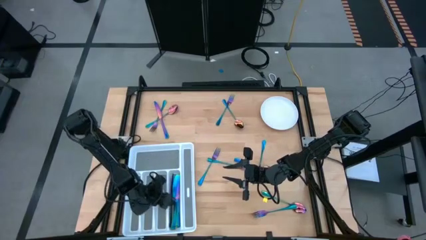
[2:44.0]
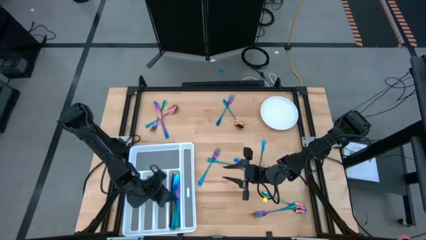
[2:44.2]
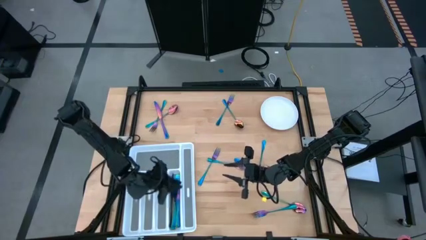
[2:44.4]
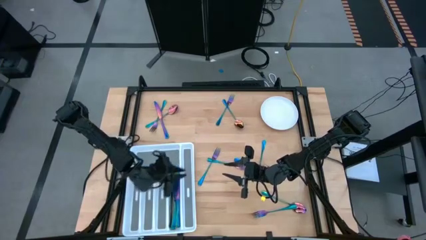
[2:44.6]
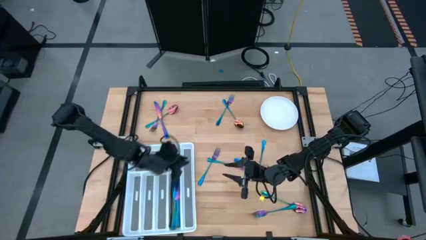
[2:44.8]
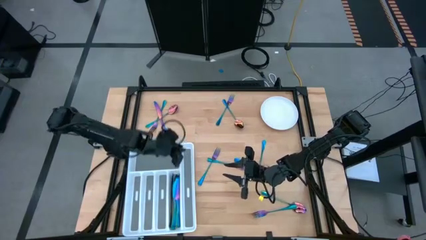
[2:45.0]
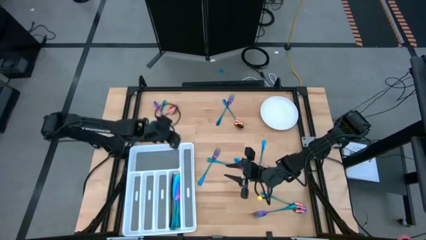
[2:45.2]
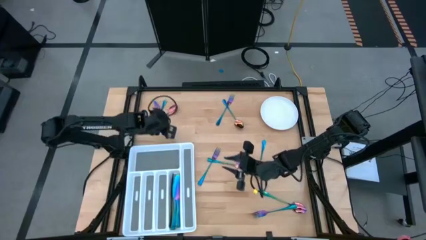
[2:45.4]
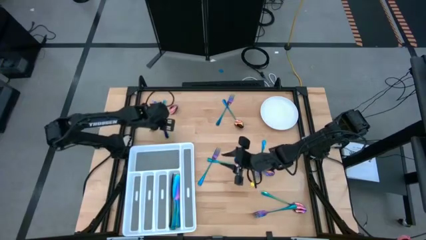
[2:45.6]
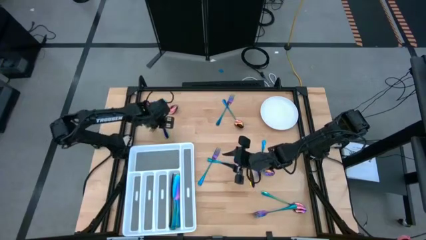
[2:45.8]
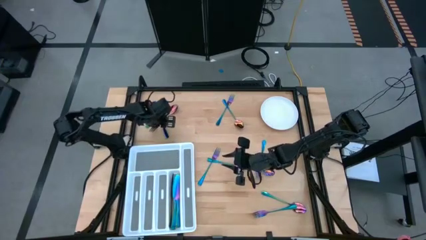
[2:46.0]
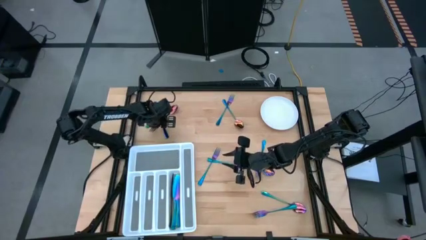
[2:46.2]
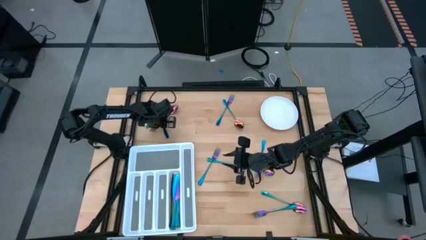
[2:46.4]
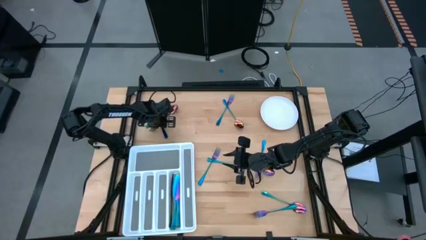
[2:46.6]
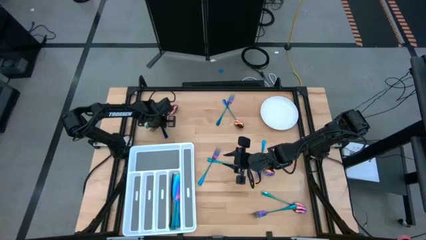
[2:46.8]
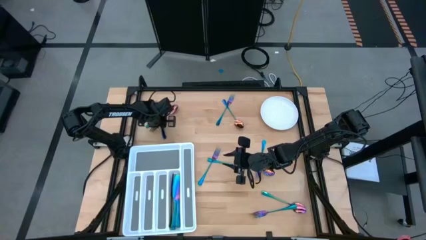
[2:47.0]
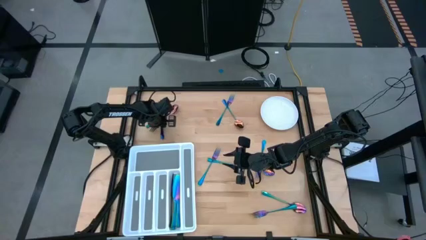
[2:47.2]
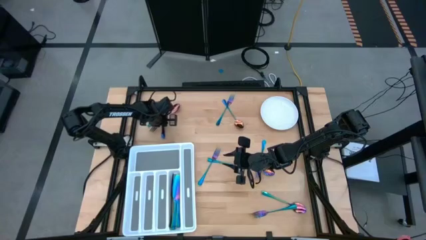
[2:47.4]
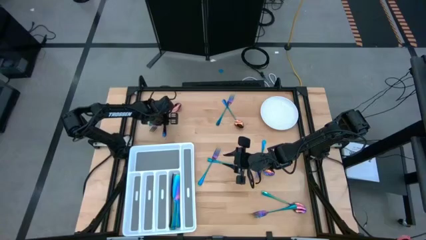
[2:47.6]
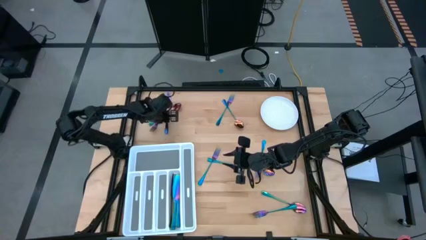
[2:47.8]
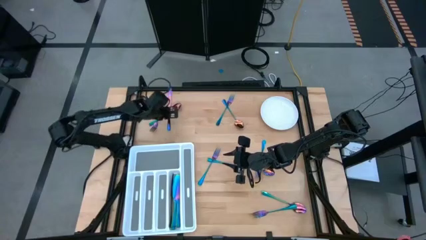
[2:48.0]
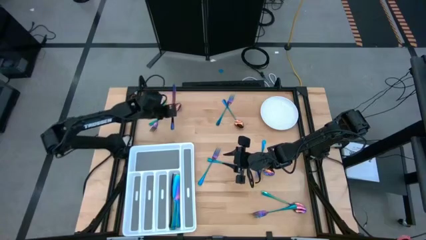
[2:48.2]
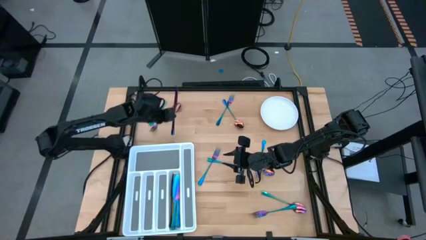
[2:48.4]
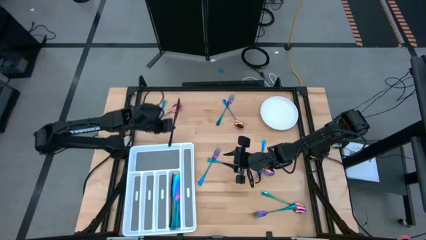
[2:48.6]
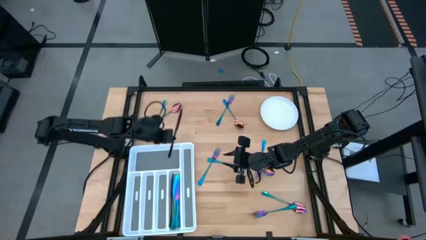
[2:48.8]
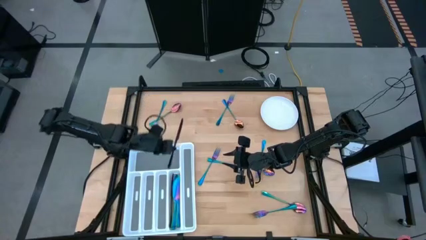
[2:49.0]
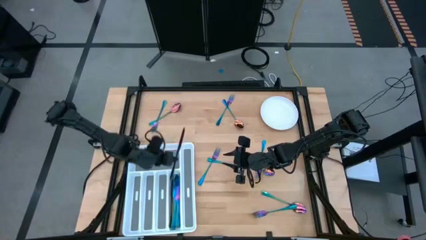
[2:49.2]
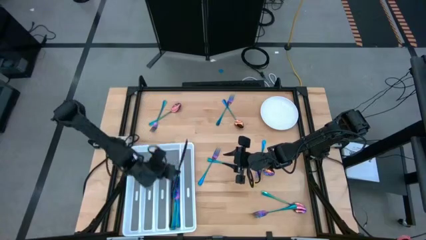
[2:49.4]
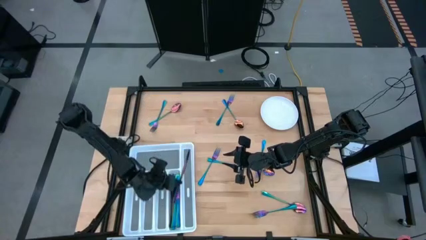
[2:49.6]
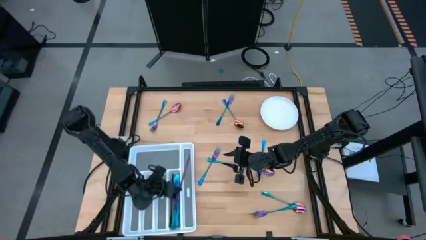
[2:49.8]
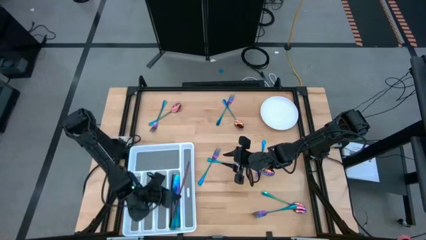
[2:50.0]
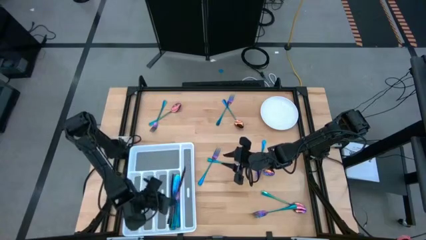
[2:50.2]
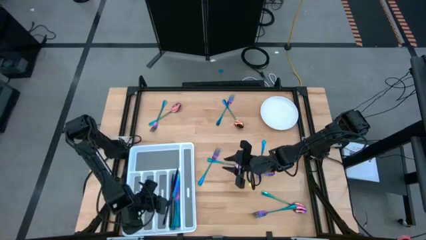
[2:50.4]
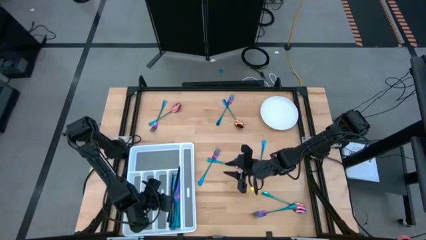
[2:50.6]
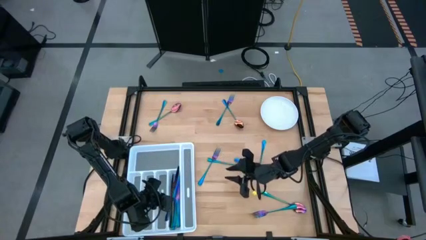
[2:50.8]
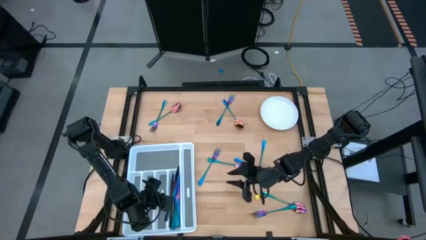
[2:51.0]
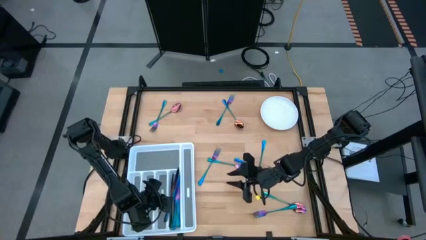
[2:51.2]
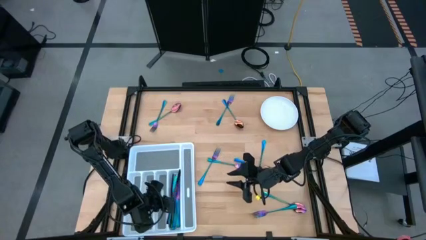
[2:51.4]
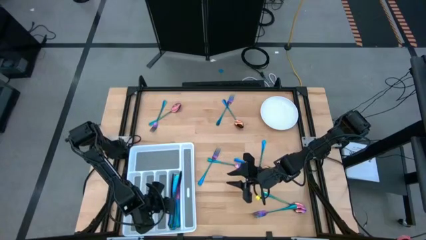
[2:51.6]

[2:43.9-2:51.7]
Task: Sort silverware
Put the iridescent knife into the cutlery tray

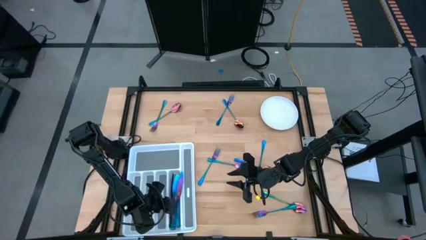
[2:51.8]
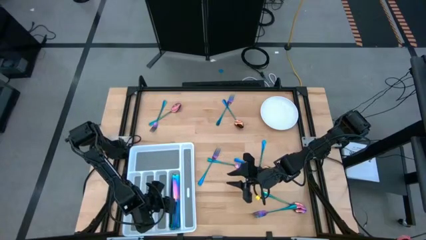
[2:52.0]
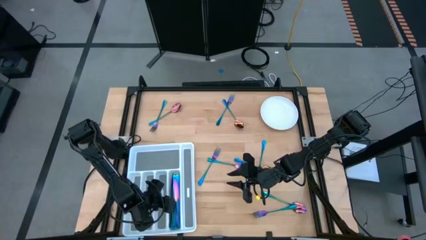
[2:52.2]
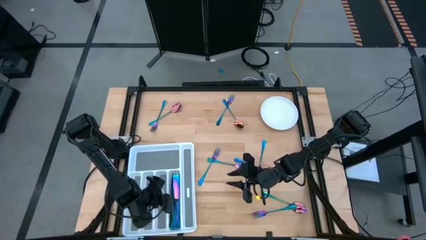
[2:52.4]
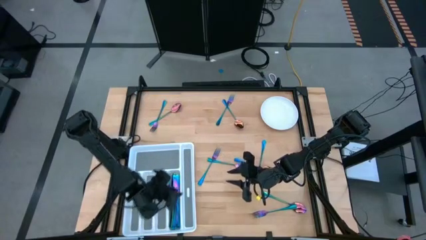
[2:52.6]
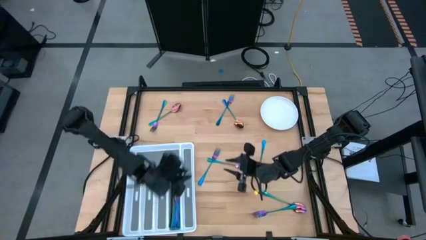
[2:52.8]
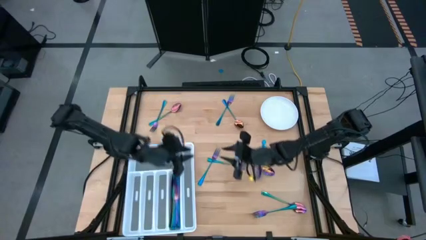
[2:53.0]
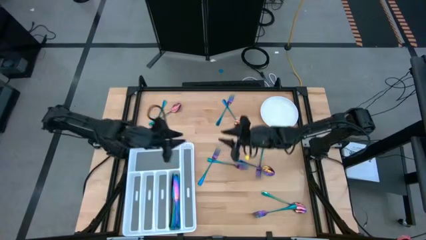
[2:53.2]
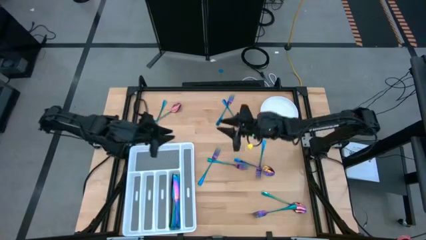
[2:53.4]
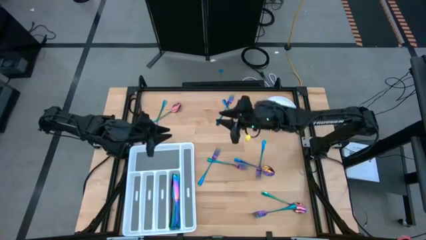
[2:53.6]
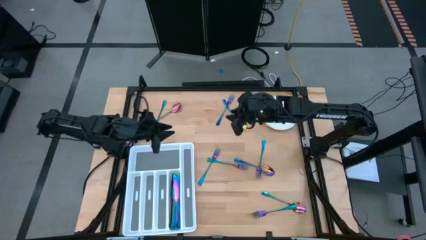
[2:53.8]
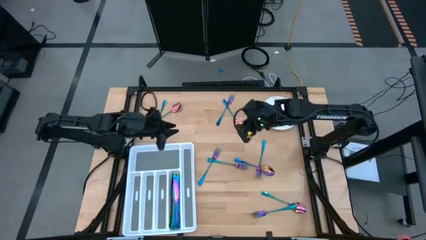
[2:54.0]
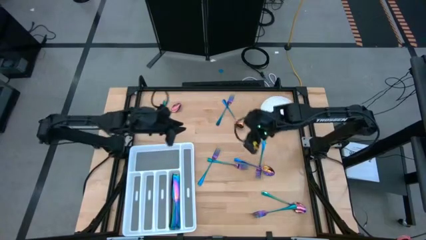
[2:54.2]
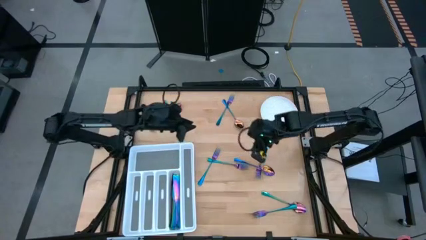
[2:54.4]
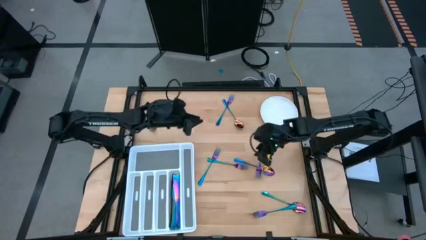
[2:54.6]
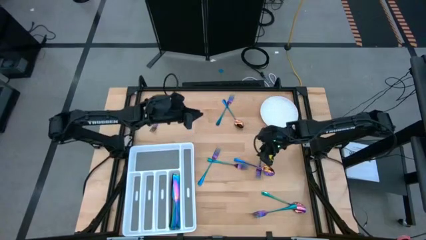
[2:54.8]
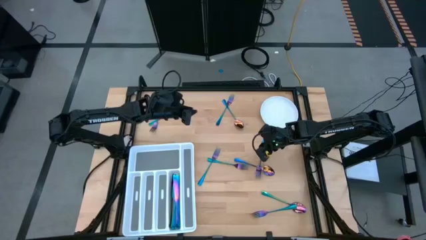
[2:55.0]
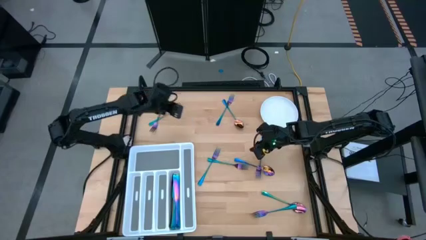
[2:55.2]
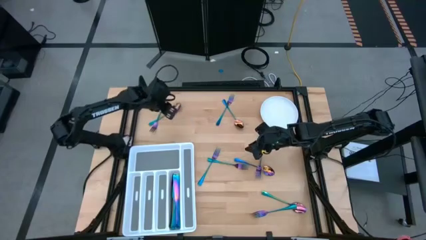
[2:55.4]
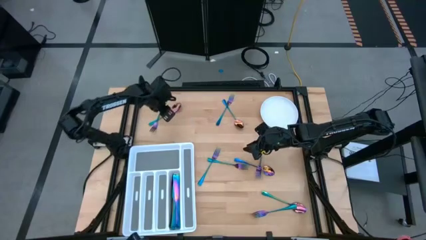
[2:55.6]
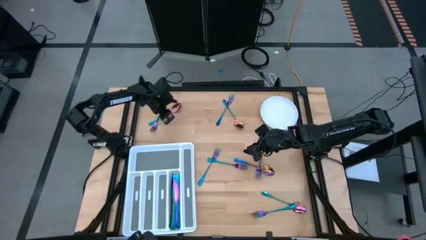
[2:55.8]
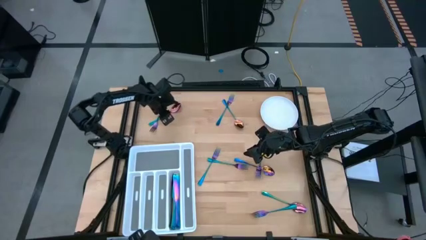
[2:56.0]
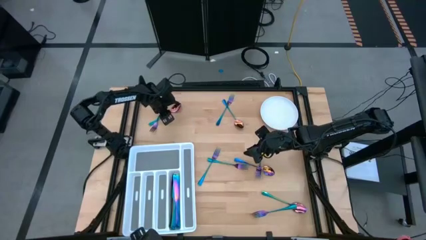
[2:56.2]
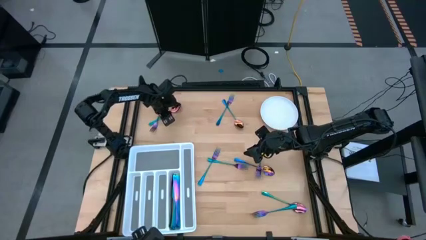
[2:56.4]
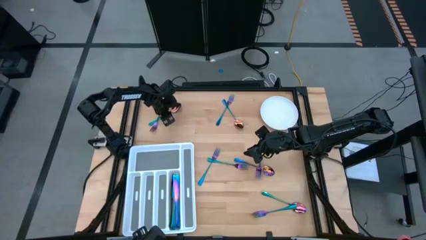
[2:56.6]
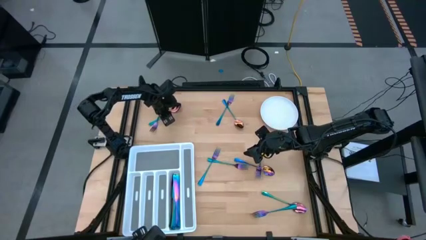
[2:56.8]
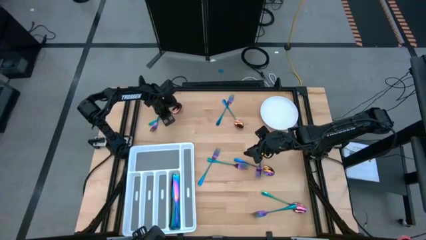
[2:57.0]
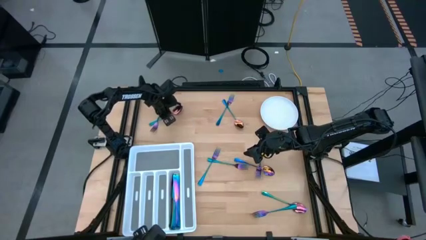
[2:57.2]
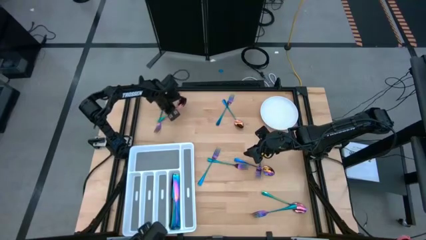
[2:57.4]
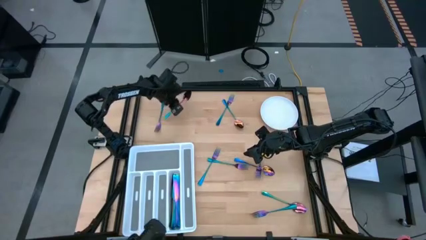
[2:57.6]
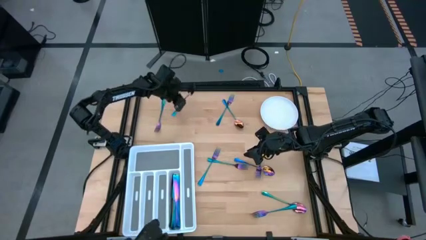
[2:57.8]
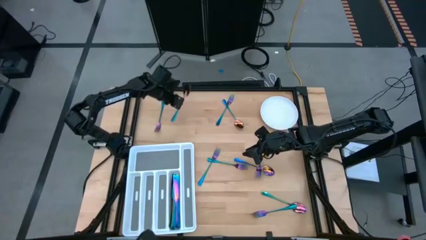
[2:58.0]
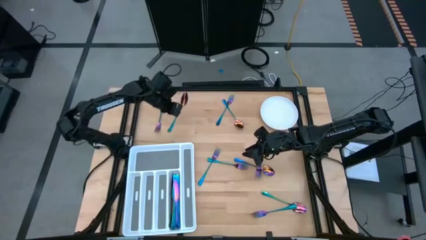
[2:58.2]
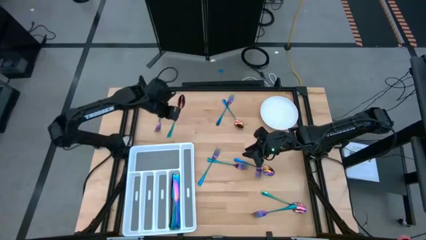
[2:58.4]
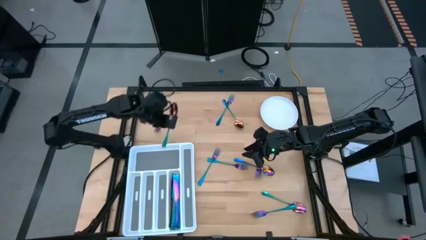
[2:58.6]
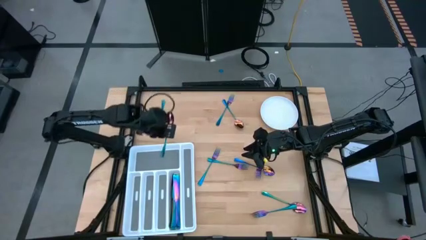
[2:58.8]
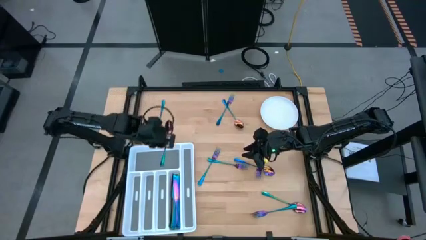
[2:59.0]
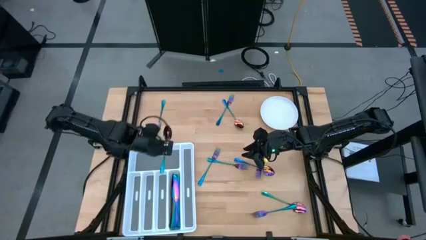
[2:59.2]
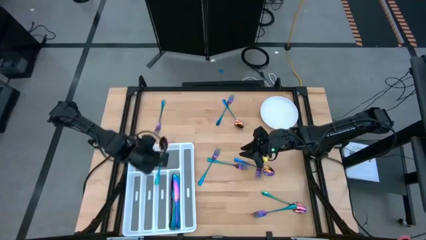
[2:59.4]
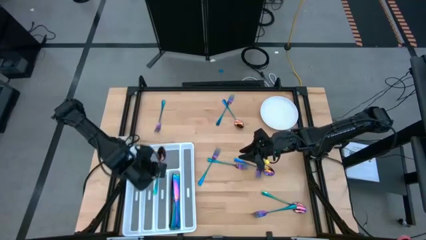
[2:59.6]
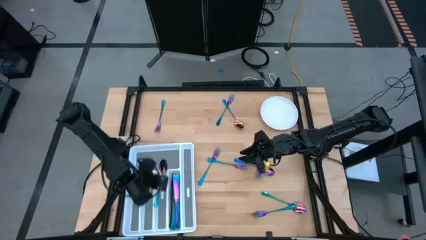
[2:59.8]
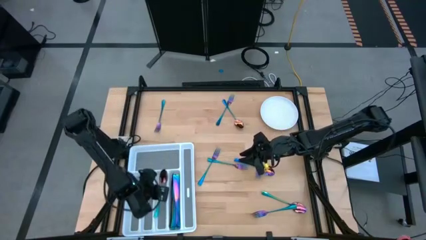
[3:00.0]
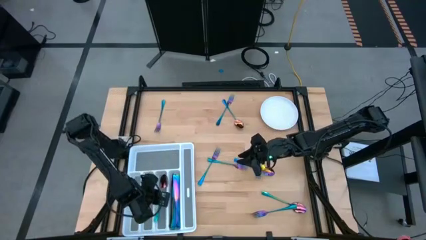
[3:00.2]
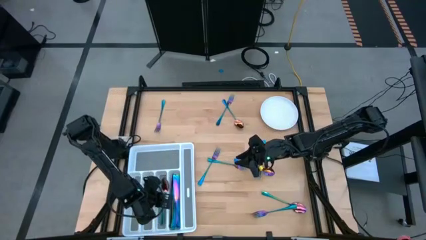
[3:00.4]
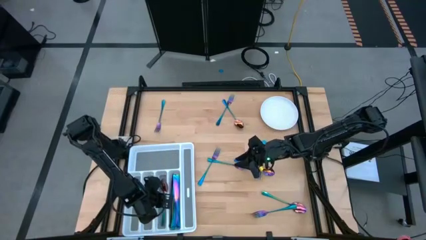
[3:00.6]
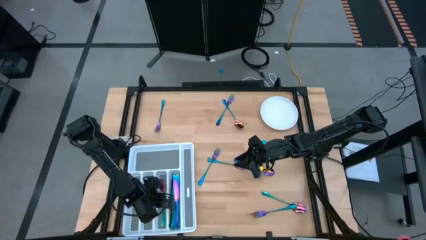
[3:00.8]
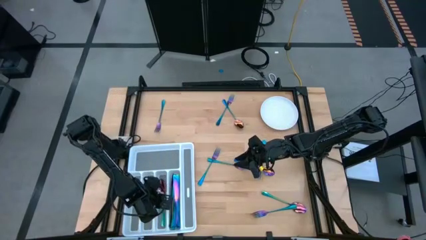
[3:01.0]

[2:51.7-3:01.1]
Put the top left iridescent spoon into the cutlery tray
